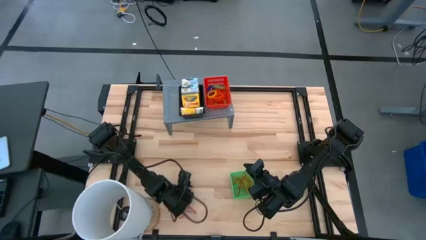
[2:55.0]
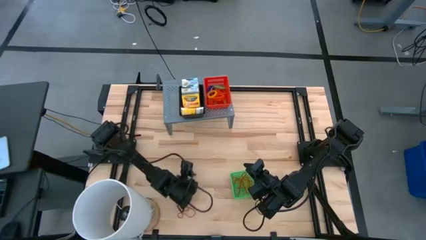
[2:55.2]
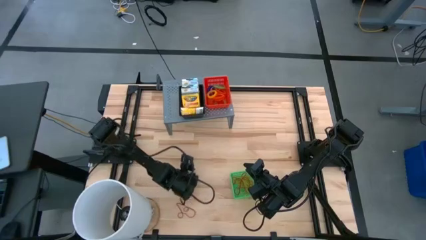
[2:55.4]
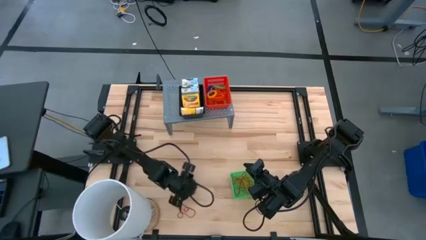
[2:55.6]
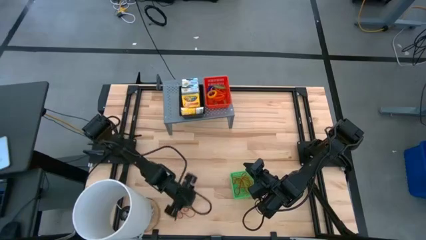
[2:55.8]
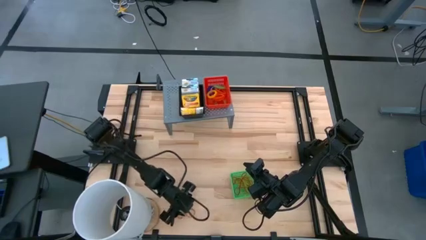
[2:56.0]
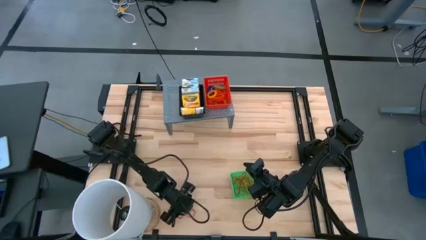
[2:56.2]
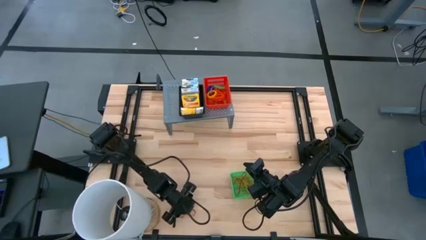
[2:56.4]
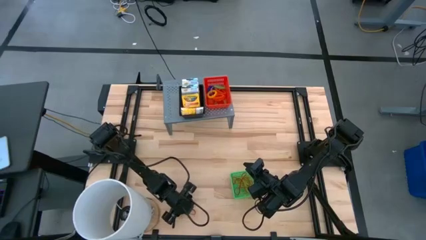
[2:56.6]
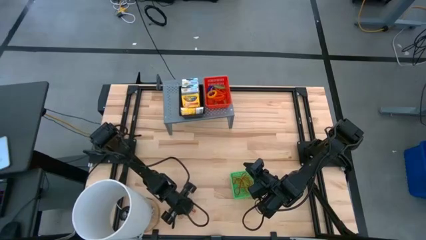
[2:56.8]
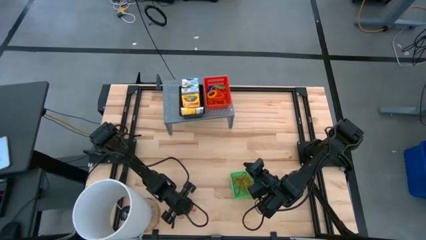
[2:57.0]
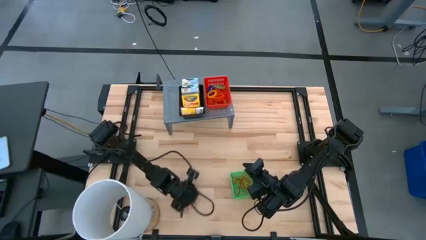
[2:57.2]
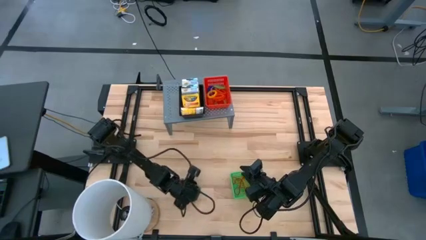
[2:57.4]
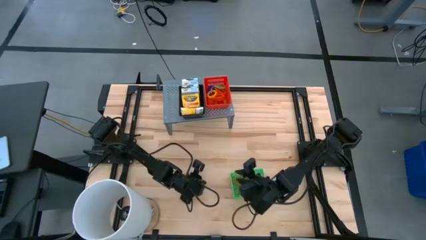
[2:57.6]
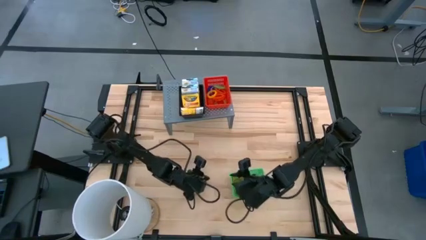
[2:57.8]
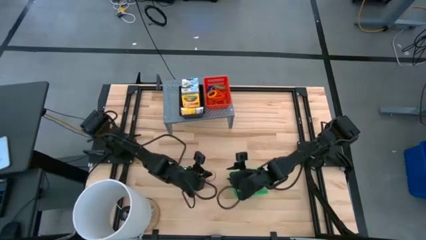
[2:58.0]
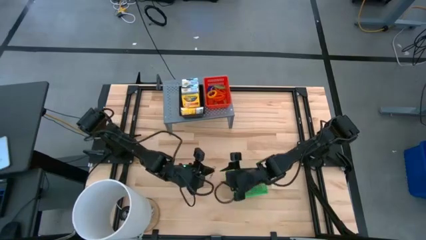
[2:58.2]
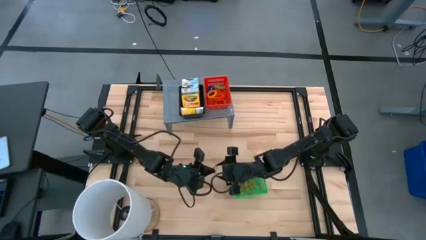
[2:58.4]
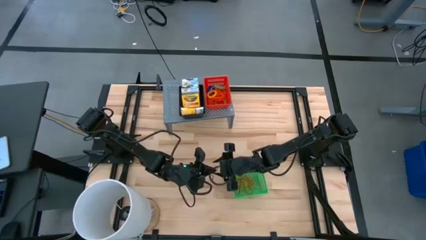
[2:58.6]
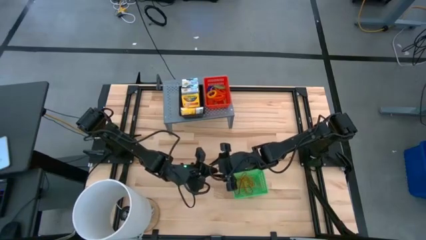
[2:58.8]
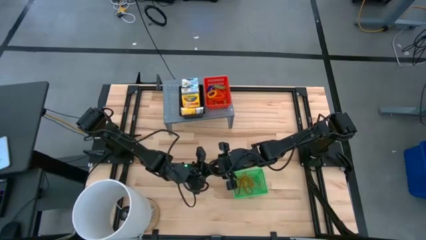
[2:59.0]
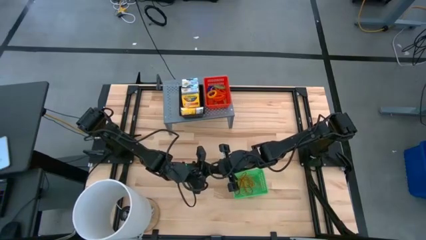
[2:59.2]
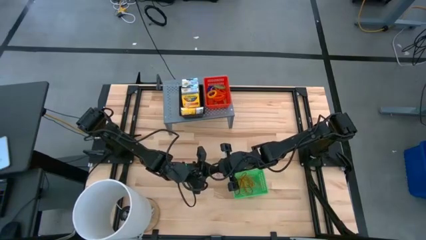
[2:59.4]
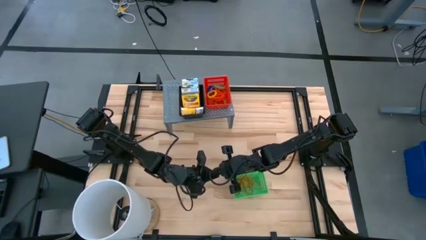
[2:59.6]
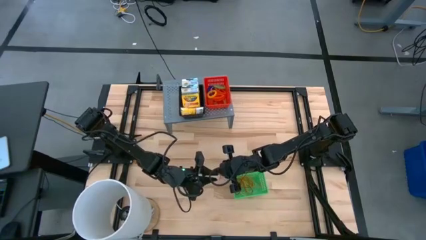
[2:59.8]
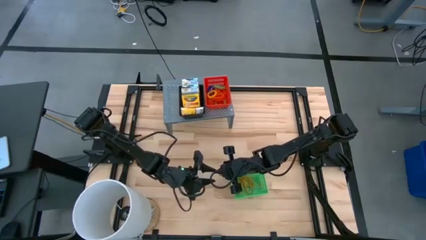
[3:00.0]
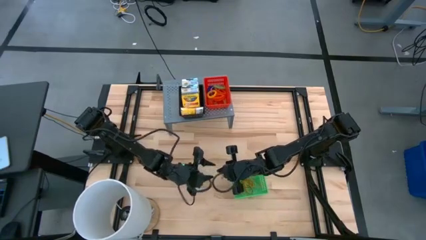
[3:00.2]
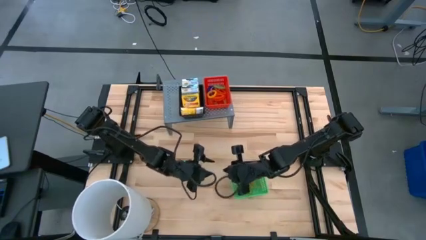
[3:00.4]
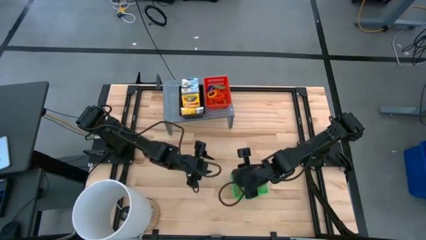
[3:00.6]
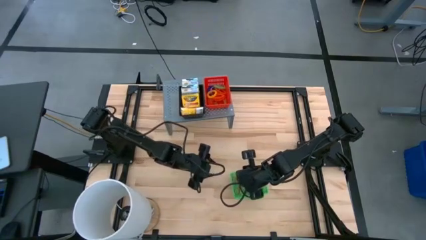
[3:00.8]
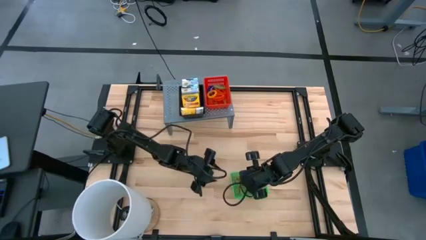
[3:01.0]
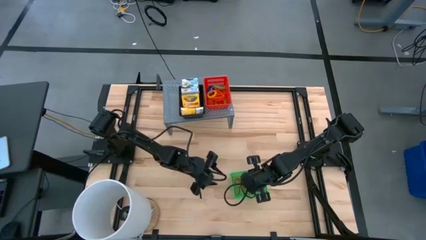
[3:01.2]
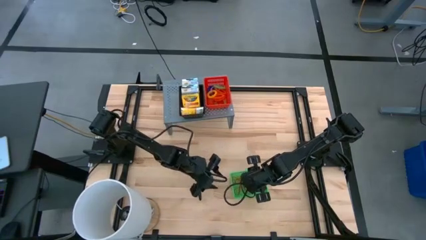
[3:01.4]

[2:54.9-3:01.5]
Task: Pick & Place Office Desk Supplies
Put the red rubber band into the green bin

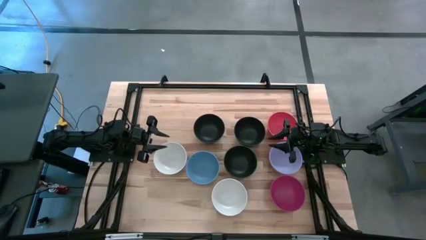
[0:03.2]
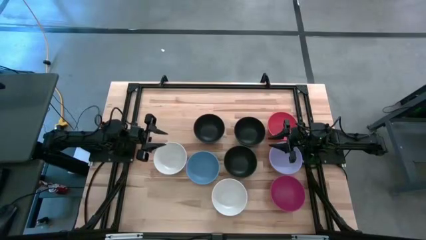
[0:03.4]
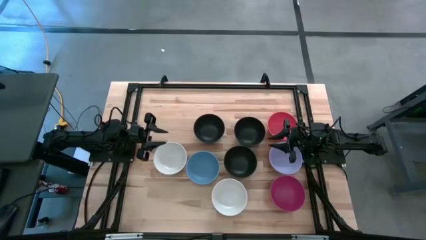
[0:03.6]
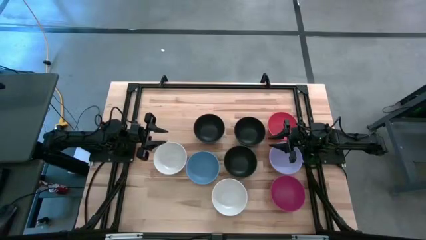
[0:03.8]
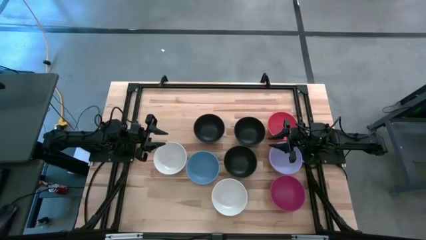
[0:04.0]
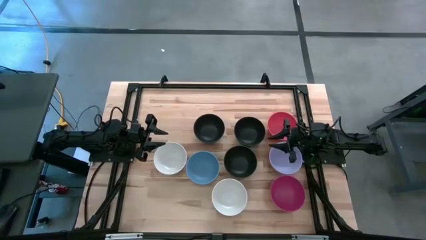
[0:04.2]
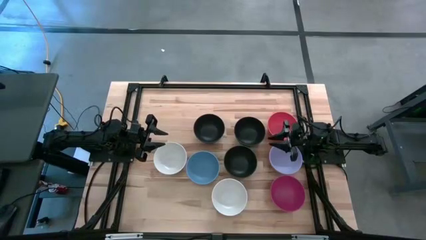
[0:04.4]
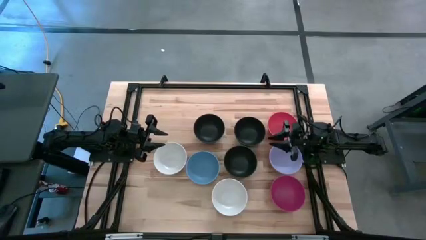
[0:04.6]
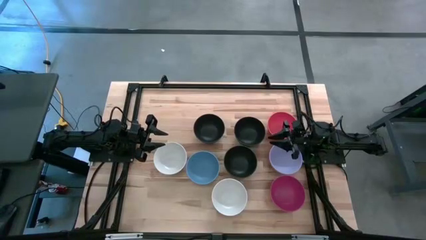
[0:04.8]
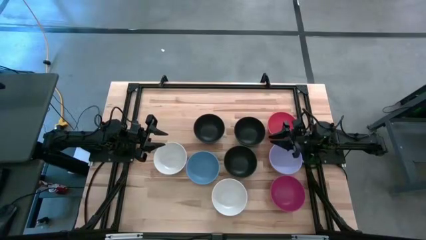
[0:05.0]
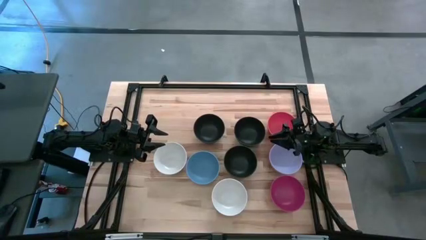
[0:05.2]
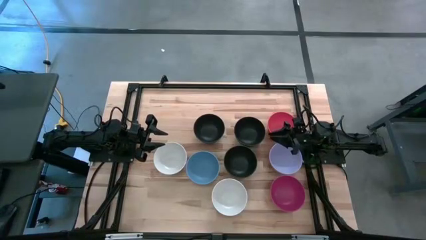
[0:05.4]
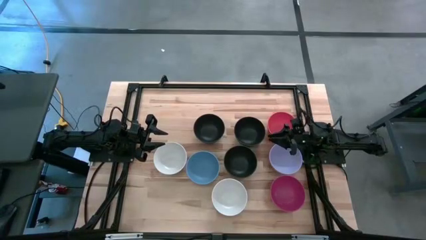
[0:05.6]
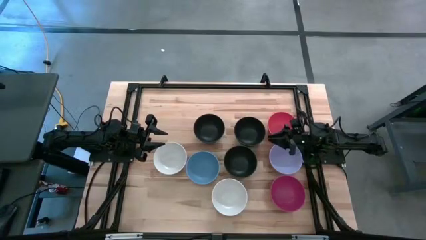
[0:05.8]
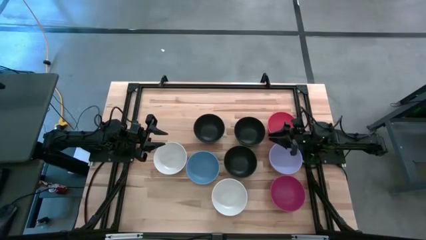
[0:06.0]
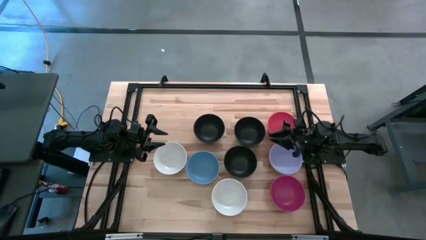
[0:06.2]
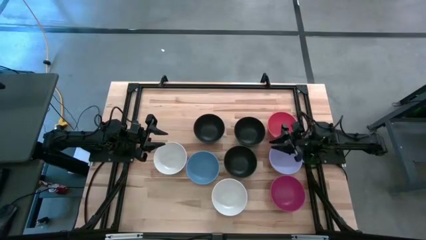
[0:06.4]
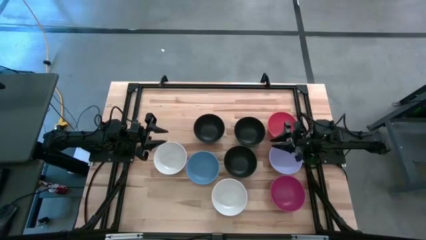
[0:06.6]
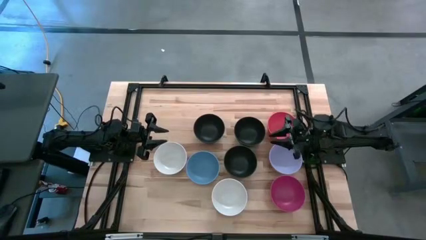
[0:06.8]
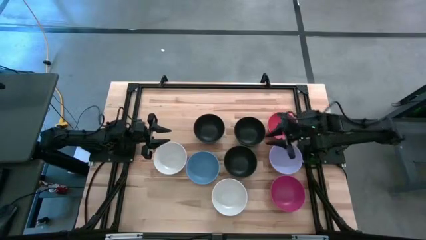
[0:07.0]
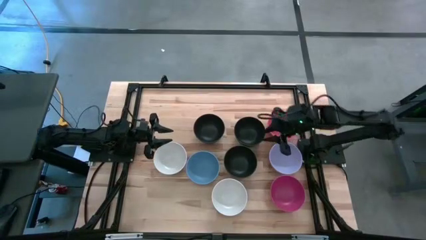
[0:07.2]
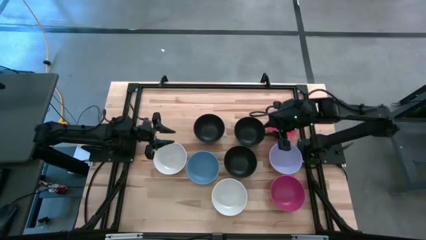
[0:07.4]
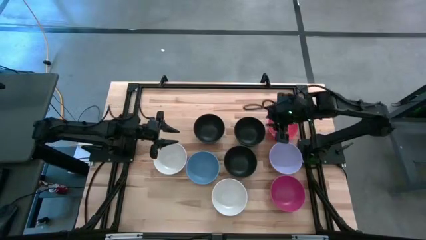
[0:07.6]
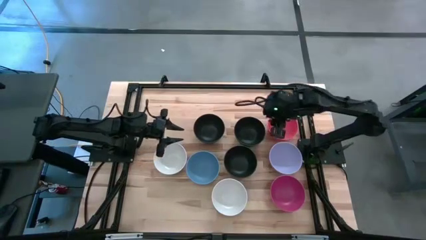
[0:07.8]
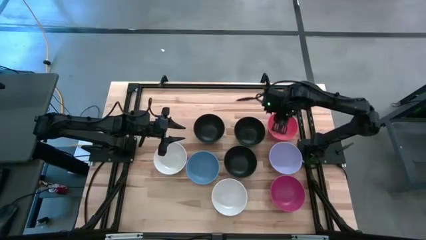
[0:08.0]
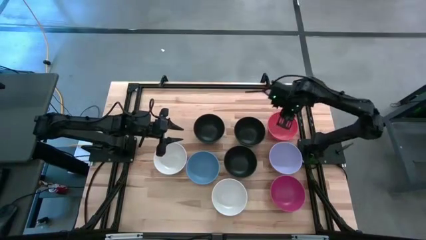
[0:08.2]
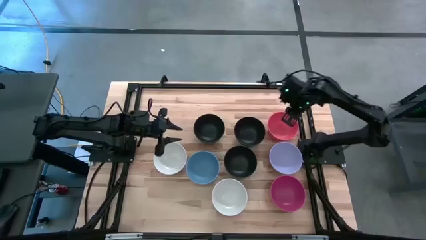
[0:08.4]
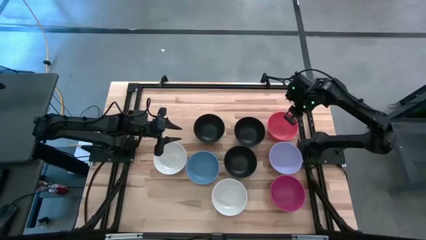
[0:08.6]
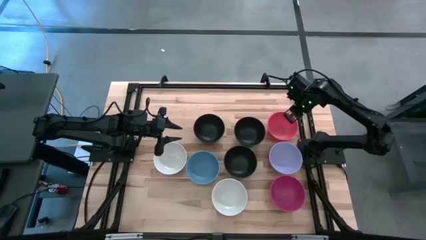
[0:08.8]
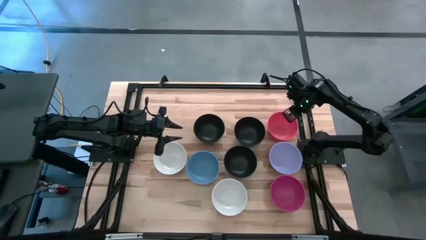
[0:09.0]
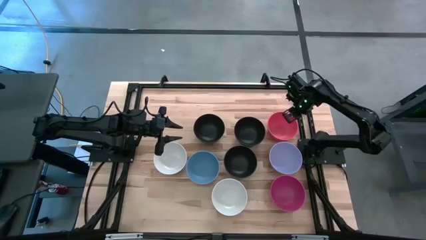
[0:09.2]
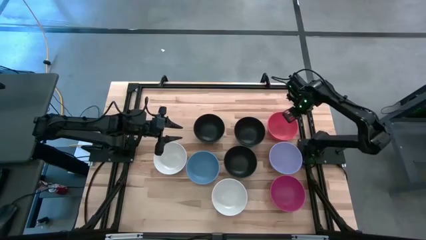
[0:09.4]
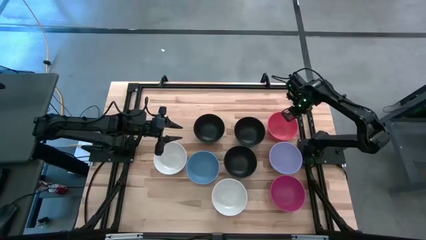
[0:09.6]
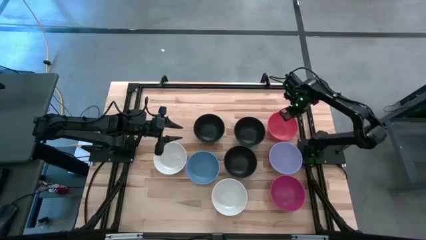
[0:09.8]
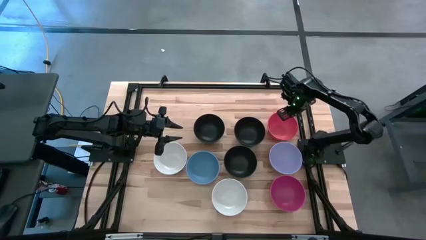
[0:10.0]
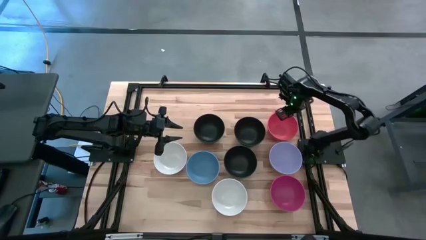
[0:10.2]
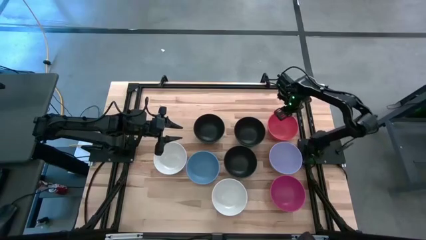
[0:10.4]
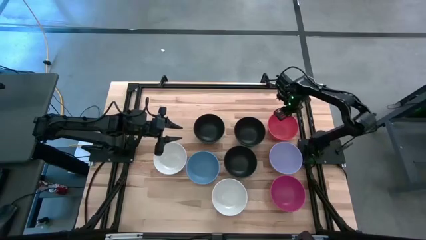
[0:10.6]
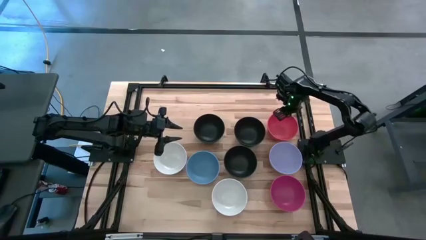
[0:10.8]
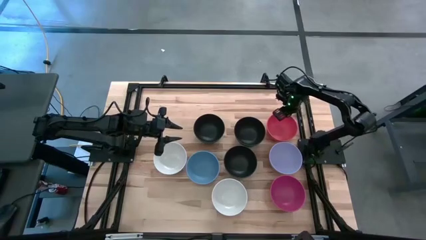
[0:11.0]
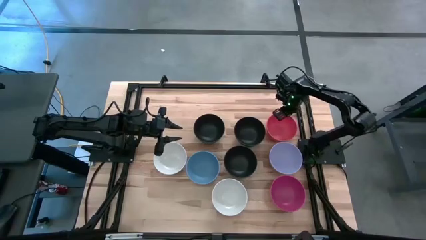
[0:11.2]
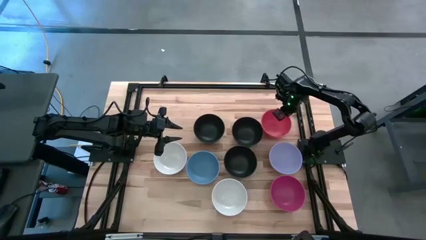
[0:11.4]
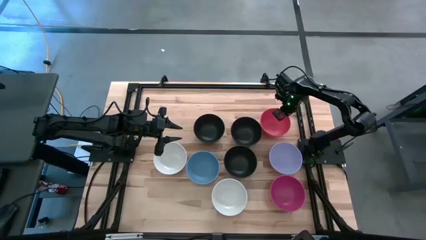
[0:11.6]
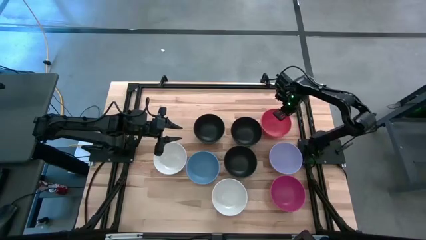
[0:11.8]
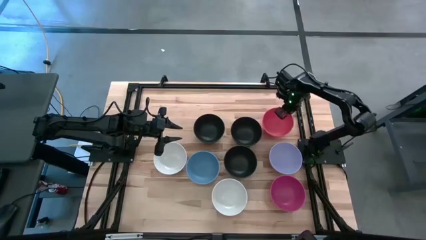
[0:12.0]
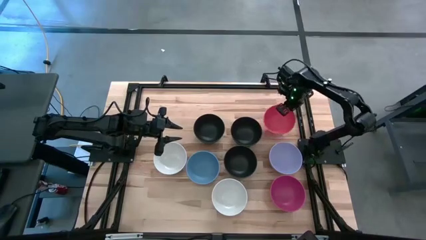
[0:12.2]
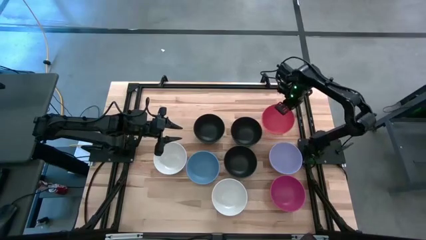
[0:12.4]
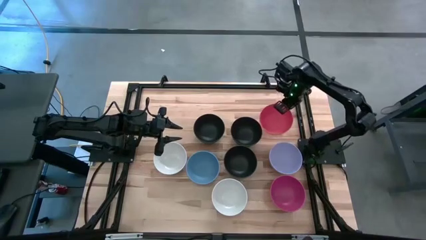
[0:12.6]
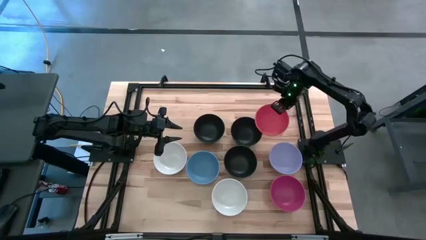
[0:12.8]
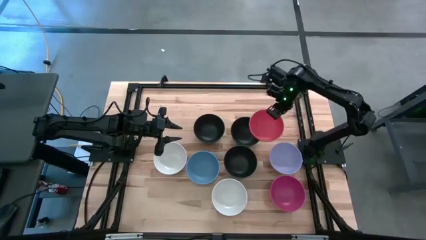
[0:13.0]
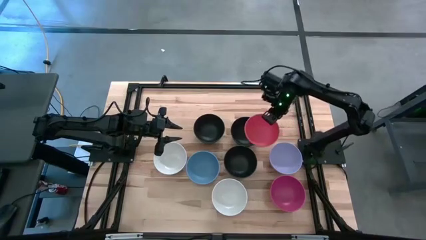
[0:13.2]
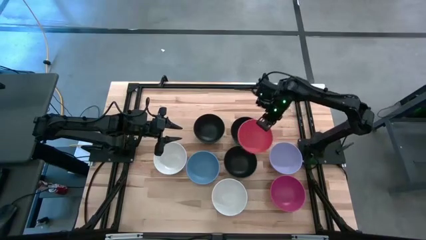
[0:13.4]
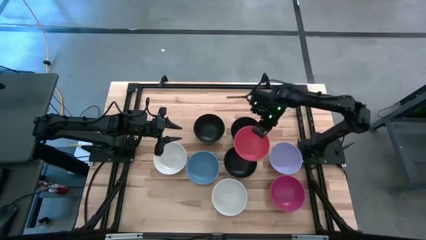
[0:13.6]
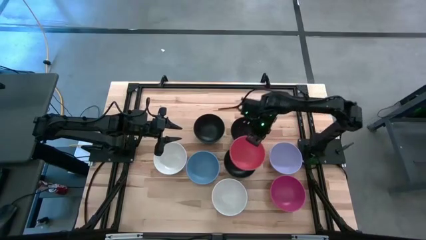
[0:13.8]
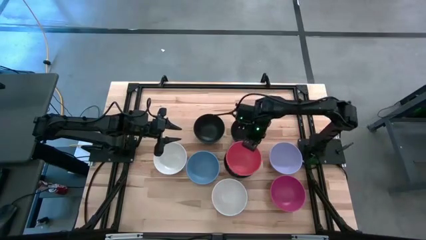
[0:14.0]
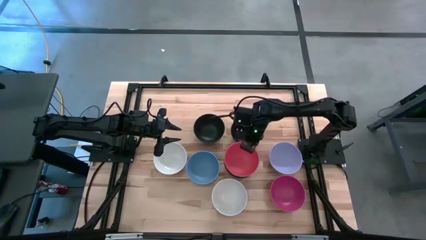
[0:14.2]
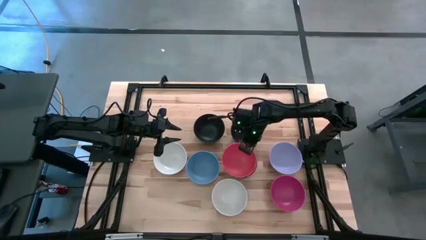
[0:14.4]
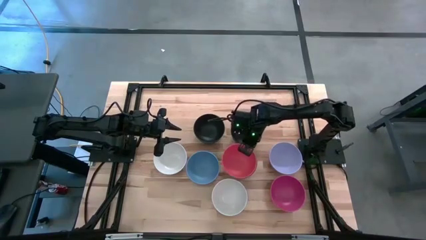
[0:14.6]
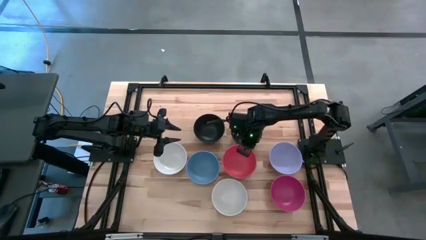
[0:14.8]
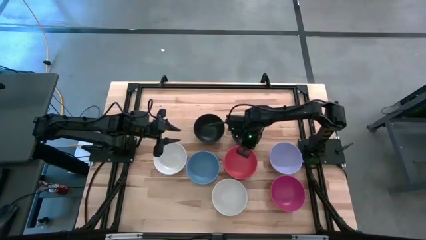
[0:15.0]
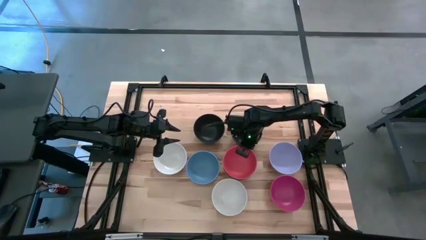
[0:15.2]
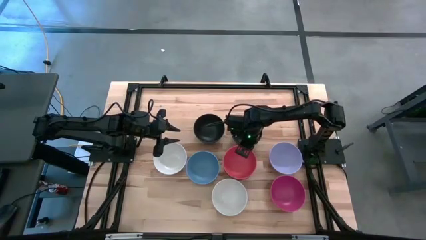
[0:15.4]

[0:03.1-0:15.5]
Task: Nest bowls inside each other
Stack the orange bowl on the bottom black bowl
